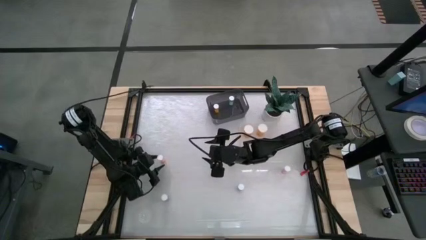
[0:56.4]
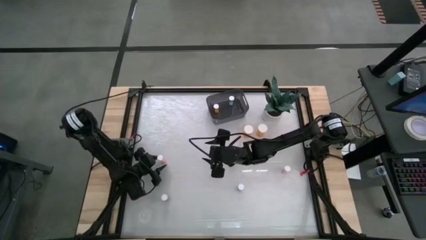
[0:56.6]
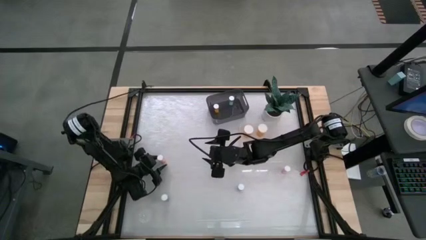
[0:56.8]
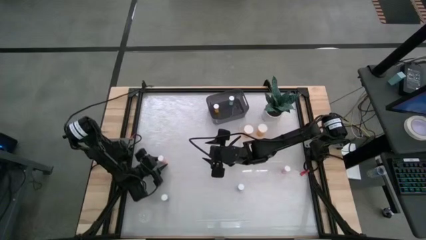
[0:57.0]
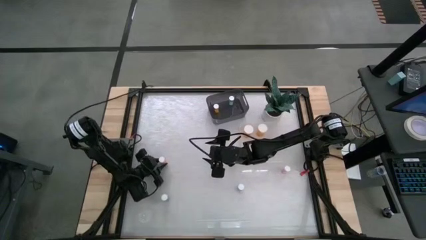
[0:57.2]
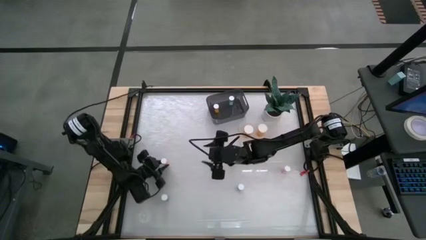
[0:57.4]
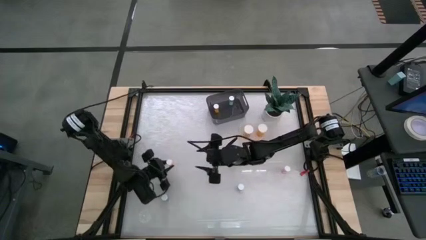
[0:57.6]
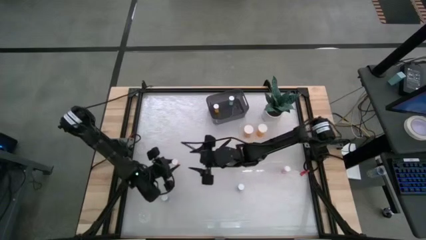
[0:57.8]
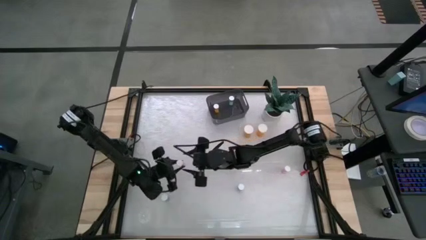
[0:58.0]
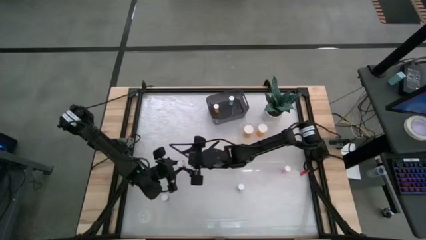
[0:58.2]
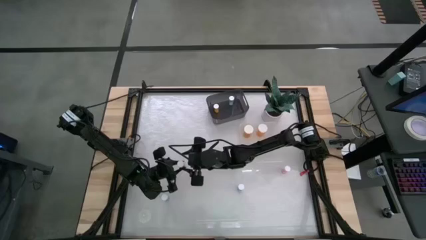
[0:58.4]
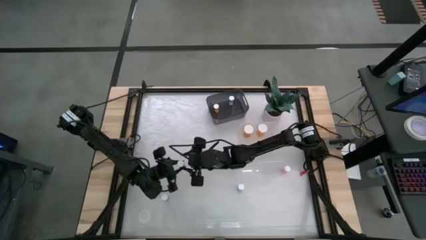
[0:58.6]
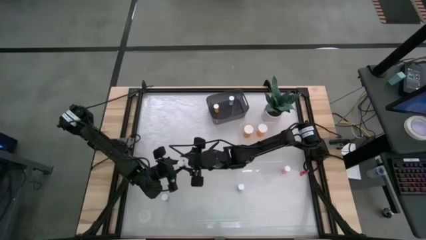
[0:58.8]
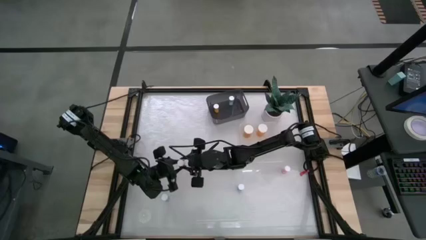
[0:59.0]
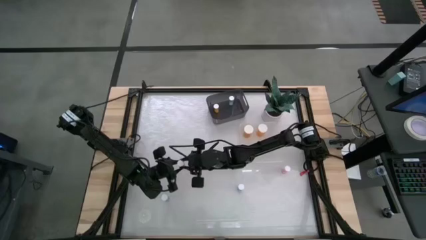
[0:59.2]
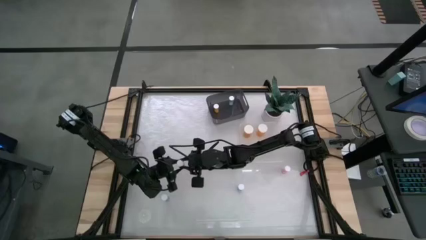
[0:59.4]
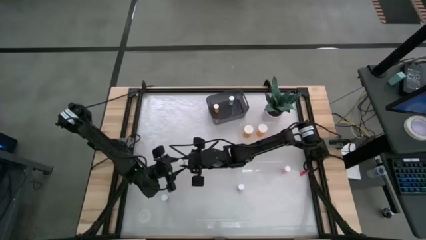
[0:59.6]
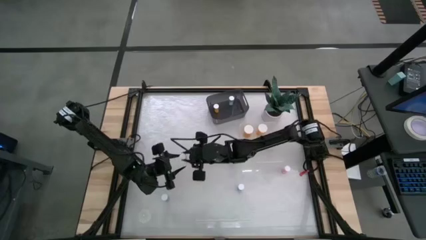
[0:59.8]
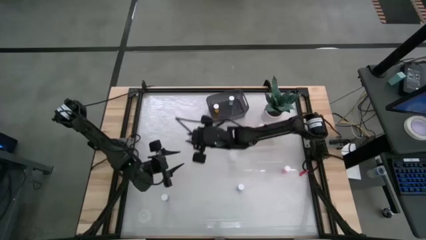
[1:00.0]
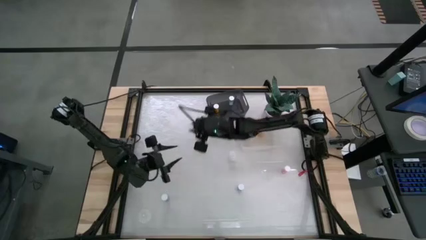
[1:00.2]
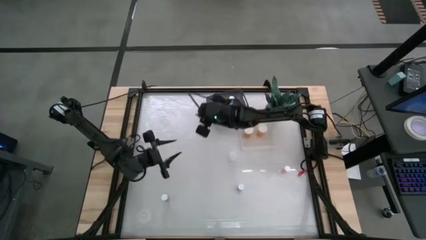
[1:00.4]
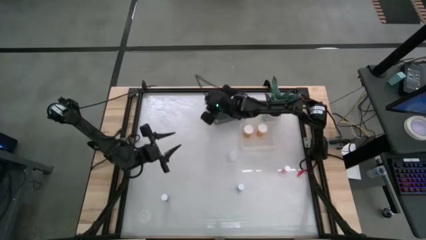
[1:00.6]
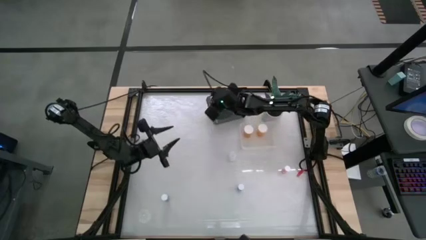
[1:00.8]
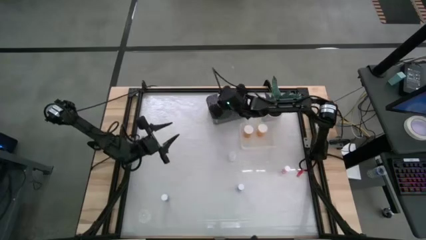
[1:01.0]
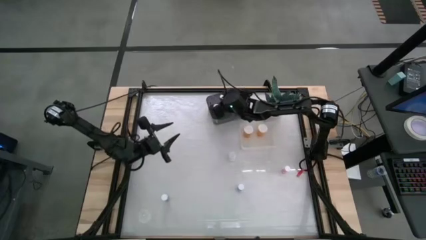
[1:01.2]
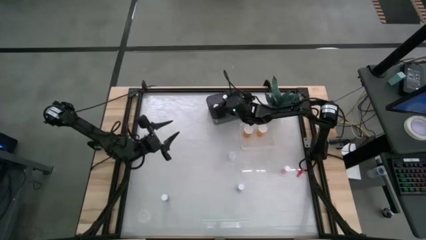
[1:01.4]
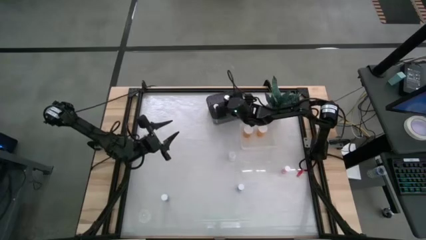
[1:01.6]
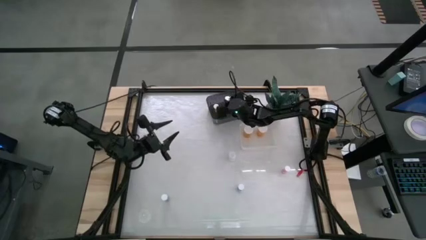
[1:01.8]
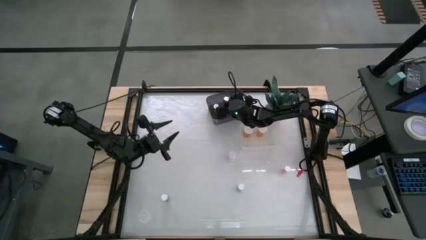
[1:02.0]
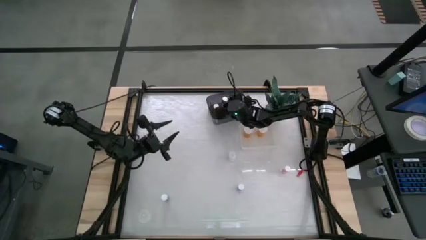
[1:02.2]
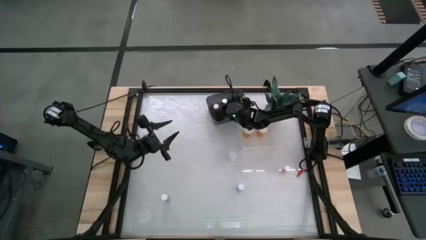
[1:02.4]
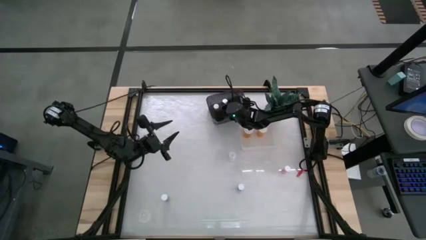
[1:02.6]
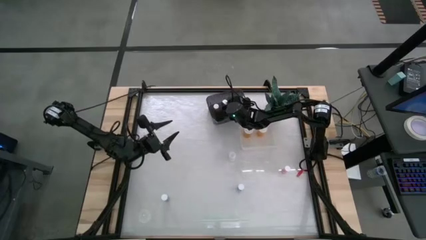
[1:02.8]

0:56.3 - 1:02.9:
Task: Pick and place medicine bottles into bin by pill shape (circle, oval)
Put the left small pink pill bottle into the black bin

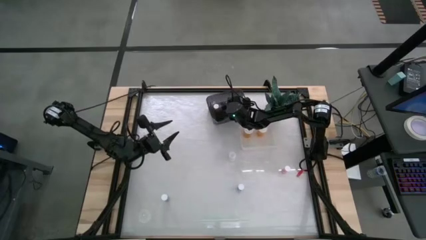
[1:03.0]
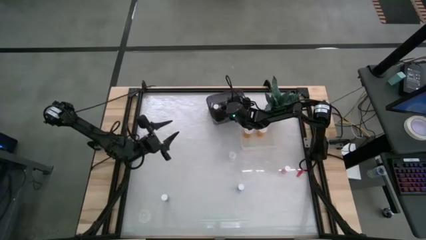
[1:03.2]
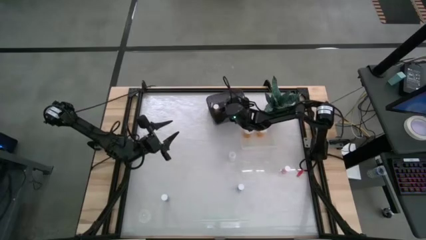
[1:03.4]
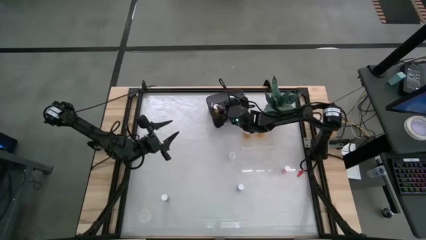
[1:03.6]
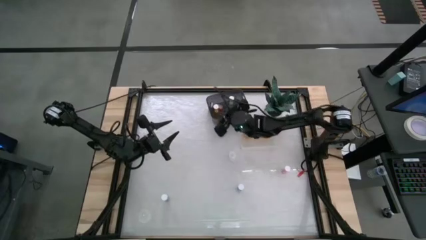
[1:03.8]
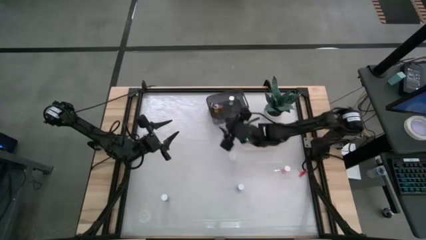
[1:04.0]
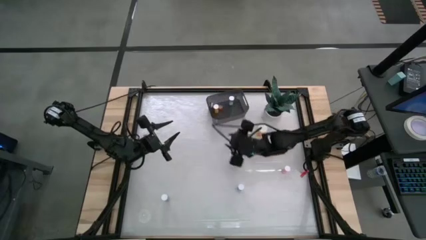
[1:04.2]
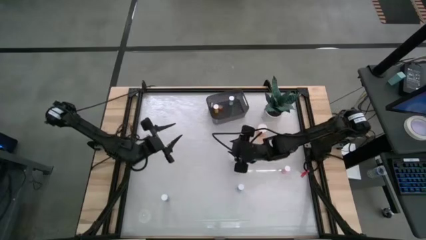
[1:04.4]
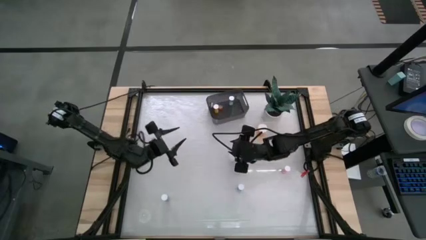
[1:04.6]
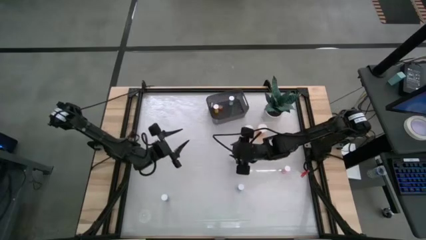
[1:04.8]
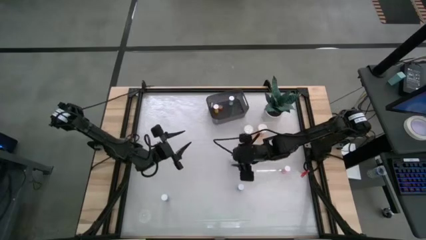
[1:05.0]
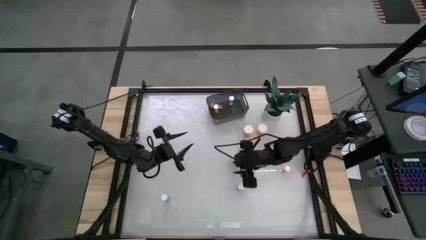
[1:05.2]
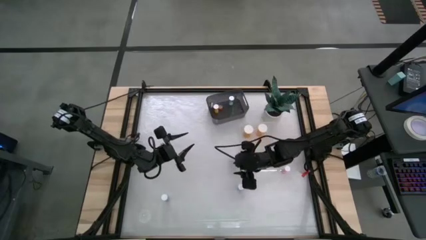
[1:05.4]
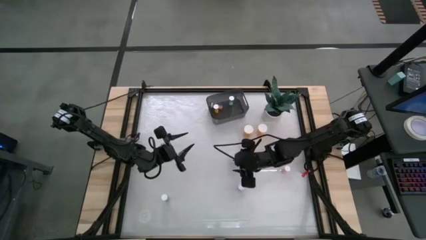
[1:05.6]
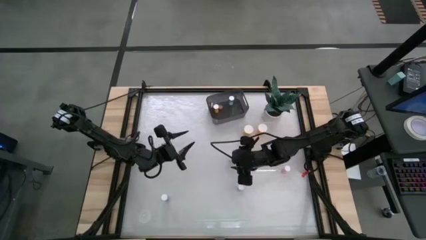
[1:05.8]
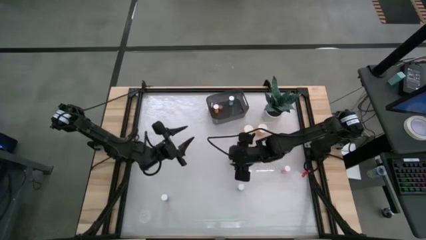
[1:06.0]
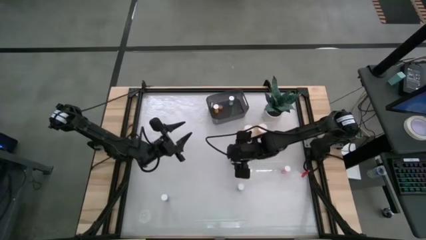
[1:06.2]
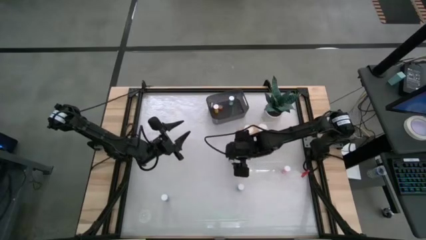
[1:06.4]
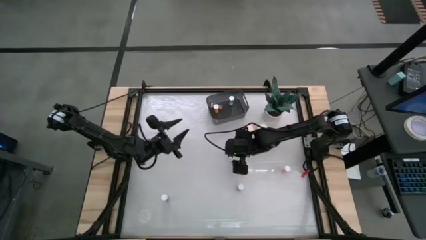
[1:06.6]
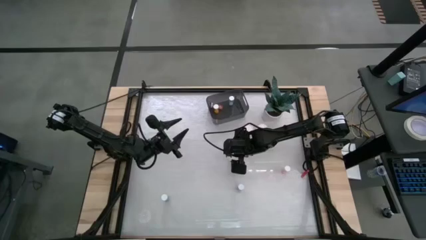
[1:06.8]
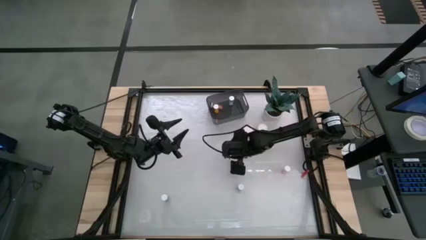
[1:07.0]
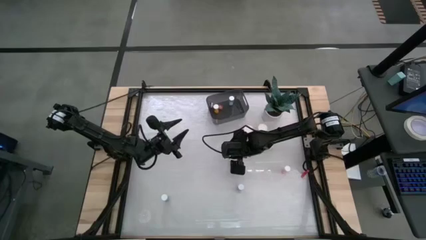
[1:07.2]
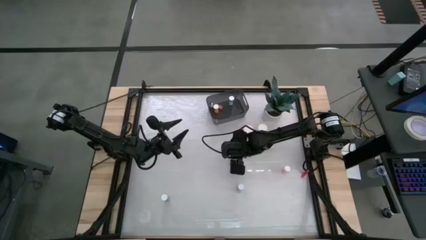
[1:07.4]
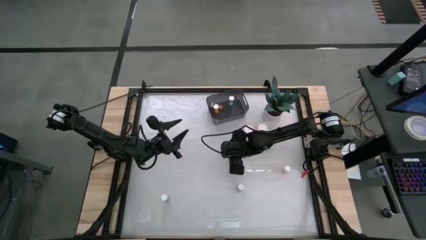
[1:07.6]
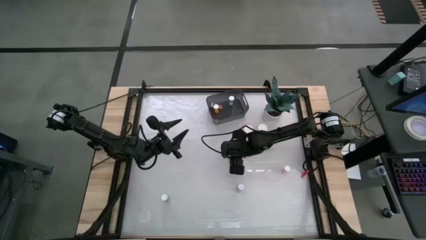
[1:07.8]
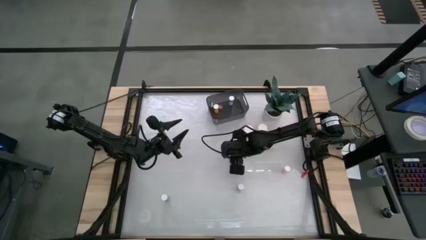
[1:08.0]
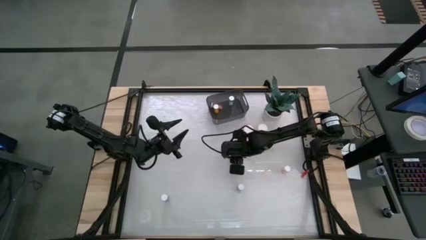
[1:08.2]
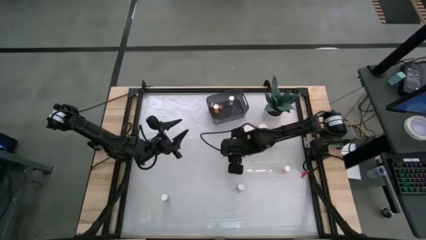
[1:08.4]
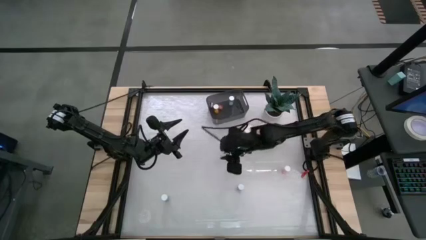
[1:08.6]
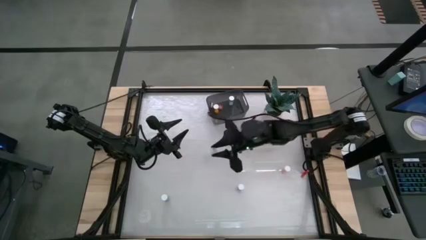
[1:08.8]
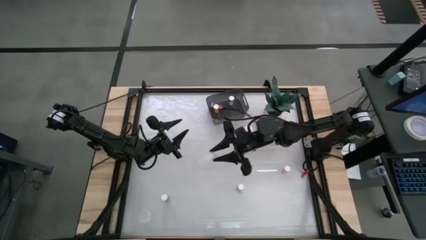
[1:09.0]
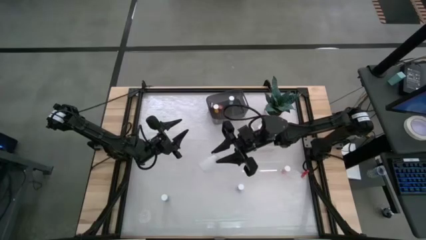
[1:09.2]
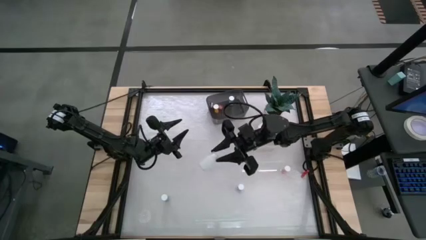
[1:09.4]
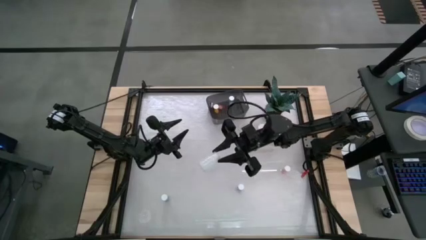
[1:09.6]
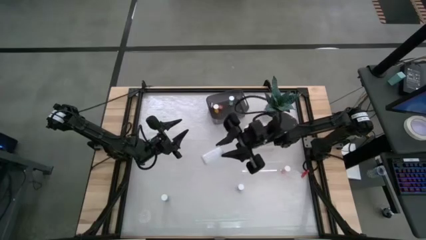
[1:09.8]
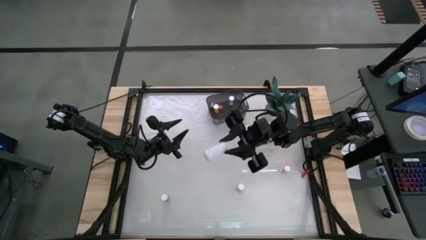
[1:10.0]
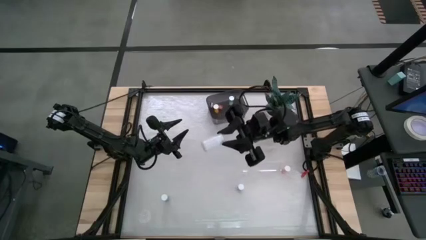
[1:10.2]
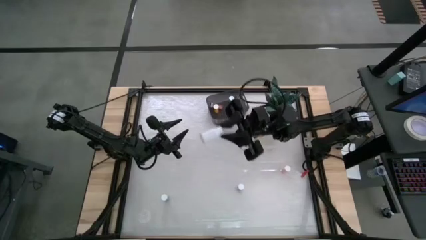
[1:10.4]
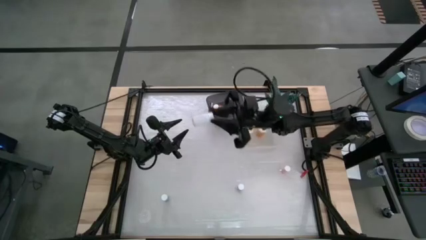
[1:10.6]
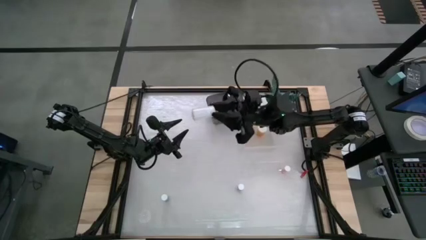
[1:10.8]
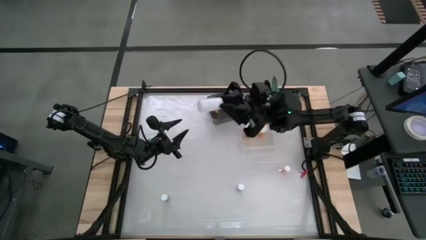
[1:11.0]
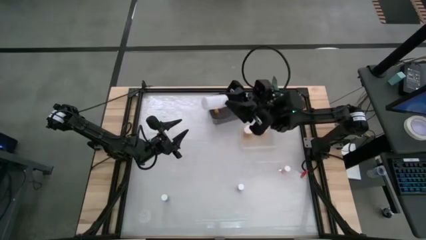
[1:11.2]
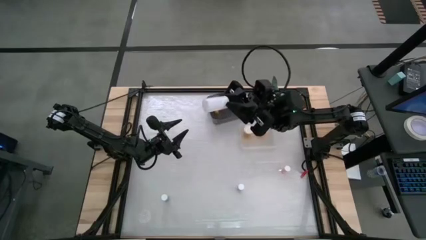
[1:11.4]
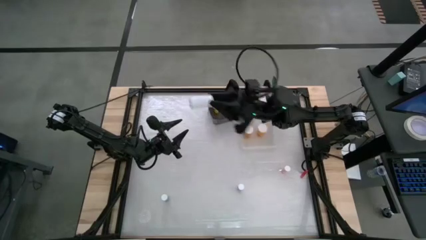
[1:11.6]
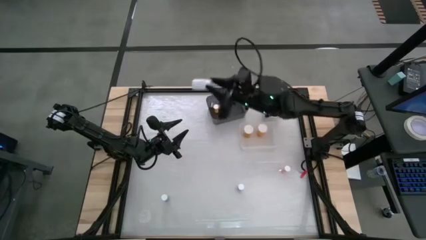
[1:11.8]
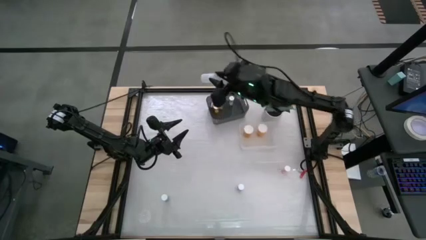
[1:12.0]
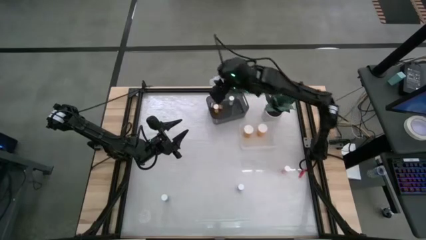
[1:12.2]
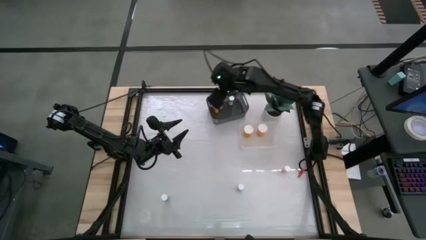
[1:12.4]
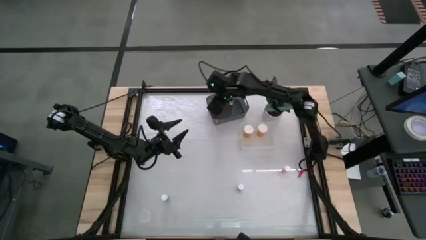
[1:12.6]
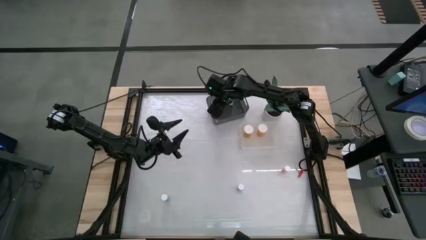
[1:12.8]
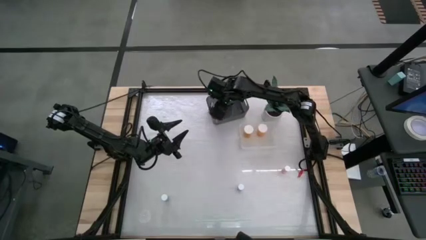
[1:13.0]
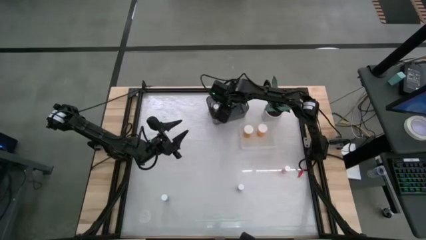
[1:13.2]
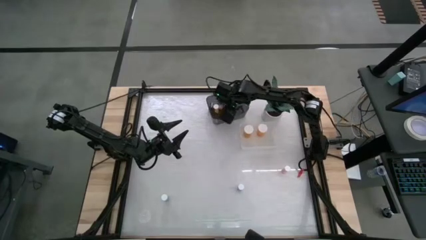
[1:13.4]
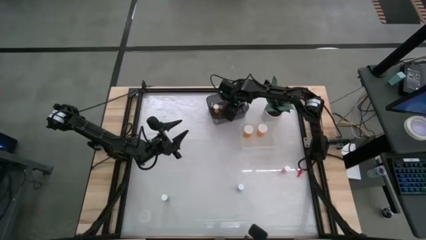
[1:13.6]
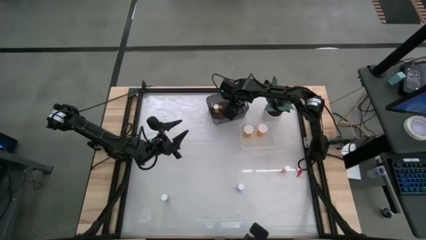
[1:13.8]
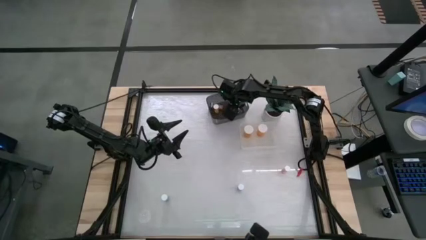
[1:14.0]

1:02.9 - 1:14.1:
Put the small white pill bottle into the black bin
